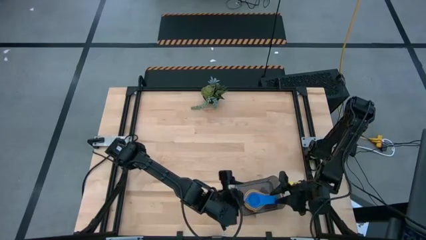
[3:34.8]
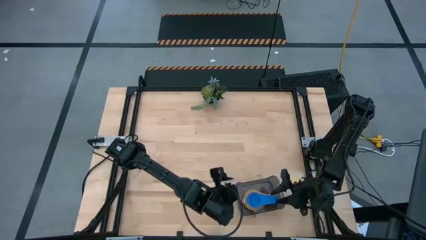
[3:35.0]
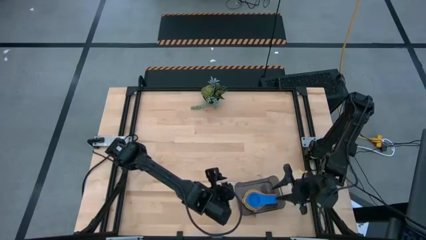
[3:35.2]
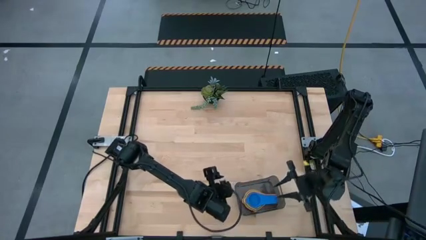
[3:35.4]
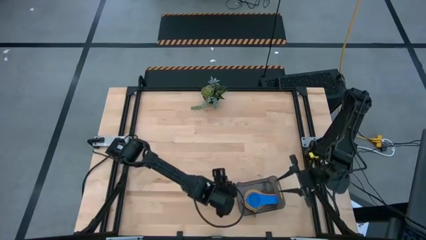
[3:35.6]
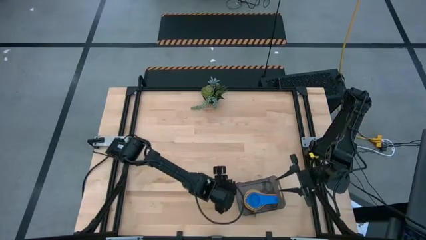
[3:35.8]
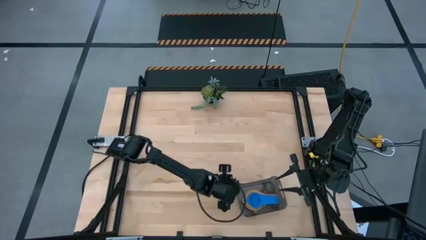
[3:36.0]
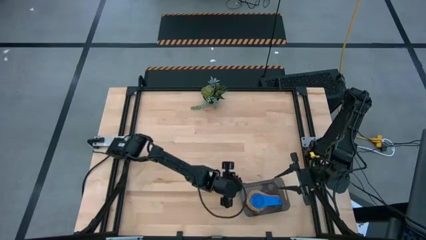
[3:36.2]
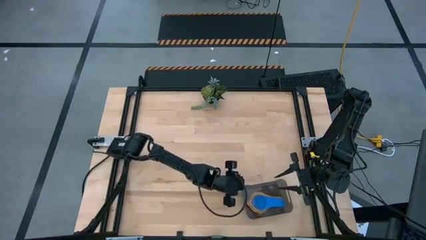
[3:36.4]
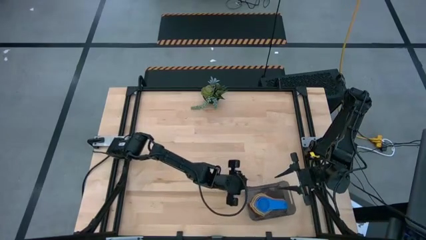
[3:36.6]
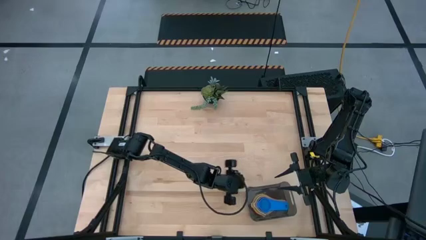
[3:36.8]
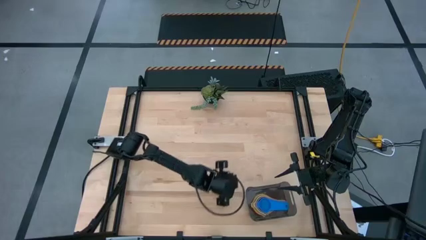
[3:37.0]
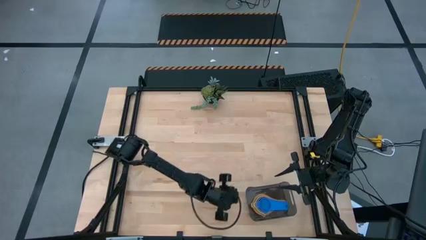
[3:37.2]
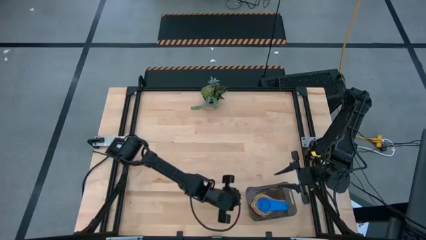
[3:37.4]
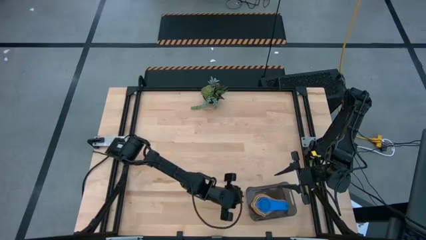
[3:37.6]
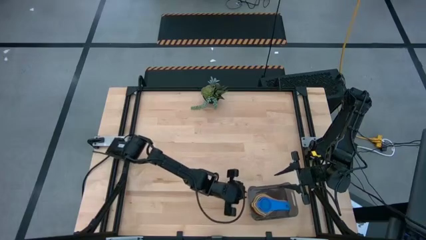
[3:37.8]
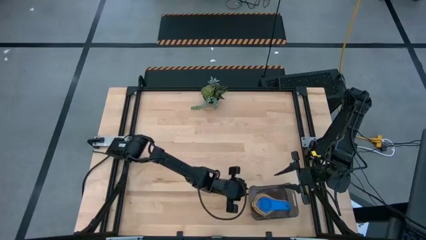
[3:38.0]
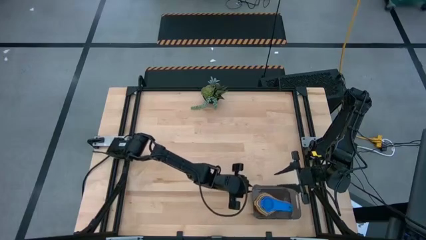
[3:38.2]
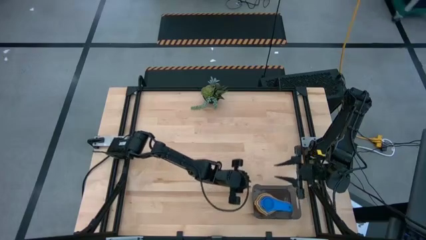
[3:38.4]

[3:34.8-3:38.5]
Task: Nest measuring cups in basket
Adjust the black transparent bin on the table

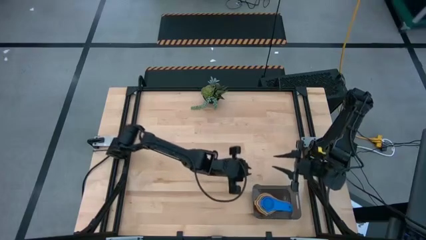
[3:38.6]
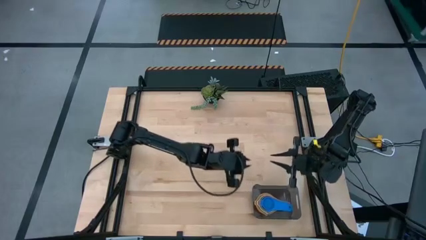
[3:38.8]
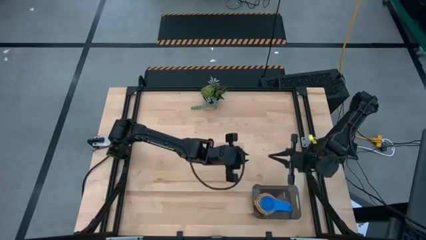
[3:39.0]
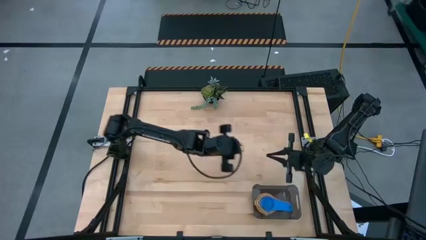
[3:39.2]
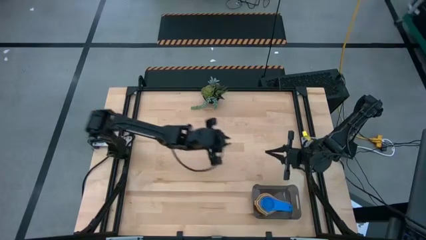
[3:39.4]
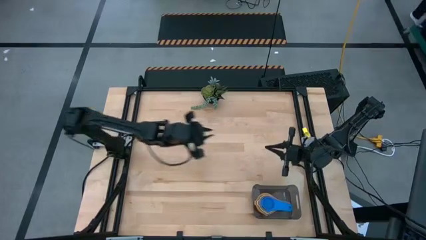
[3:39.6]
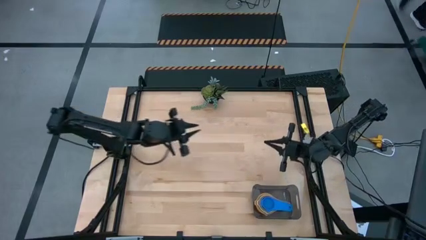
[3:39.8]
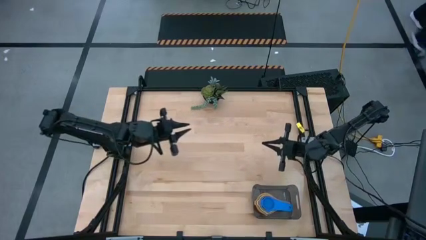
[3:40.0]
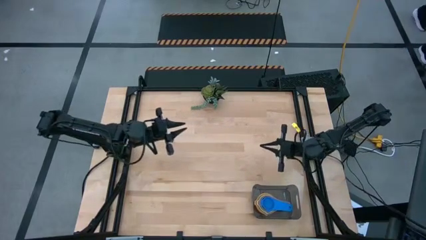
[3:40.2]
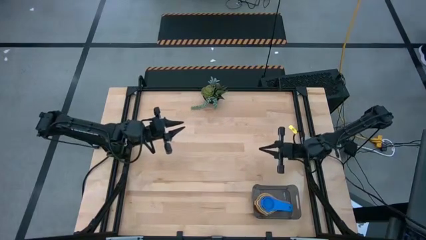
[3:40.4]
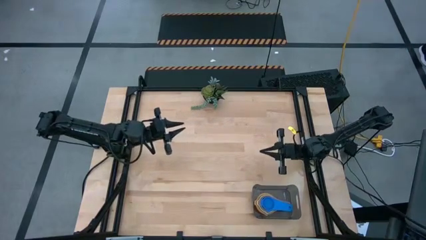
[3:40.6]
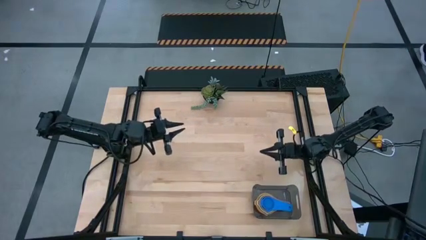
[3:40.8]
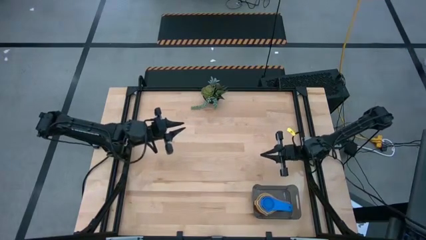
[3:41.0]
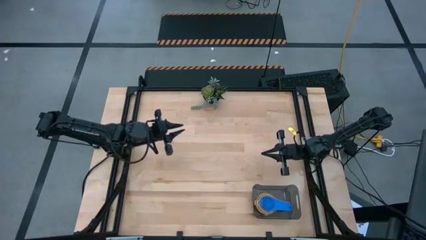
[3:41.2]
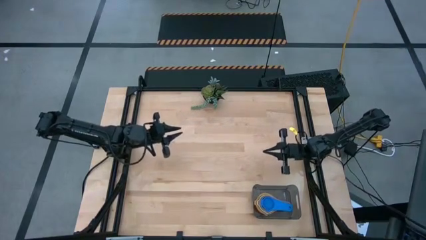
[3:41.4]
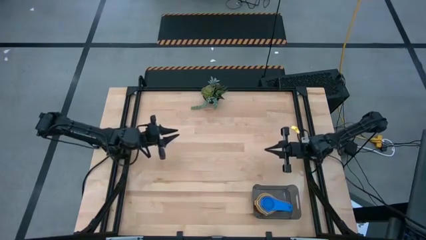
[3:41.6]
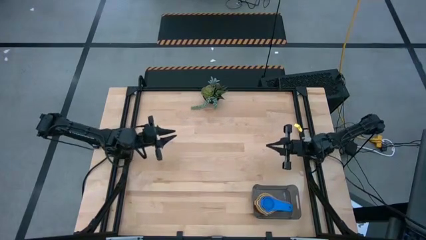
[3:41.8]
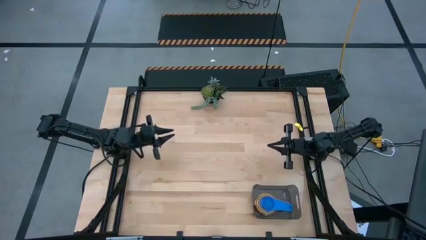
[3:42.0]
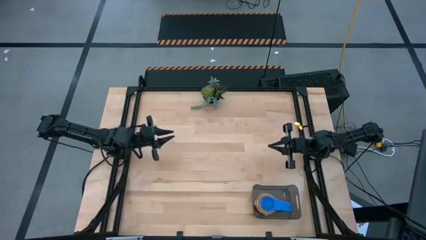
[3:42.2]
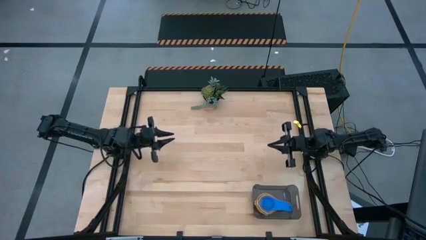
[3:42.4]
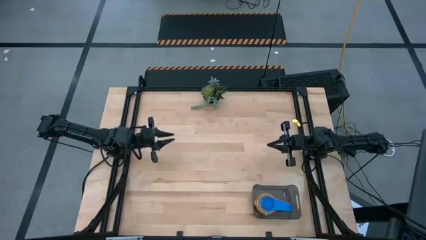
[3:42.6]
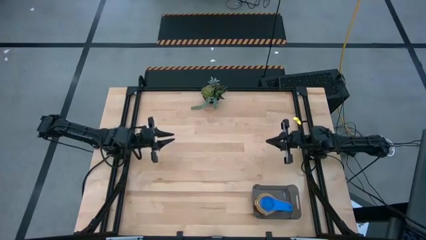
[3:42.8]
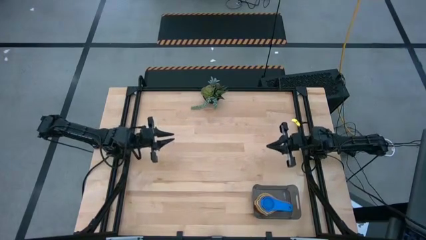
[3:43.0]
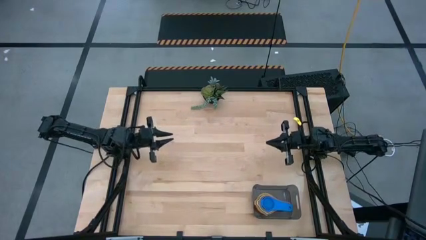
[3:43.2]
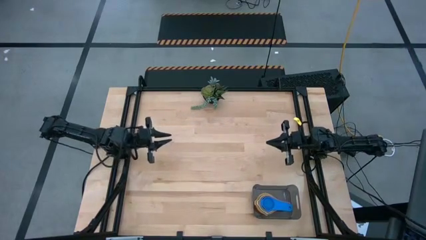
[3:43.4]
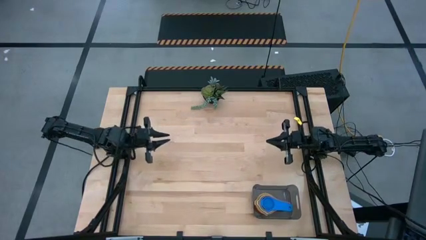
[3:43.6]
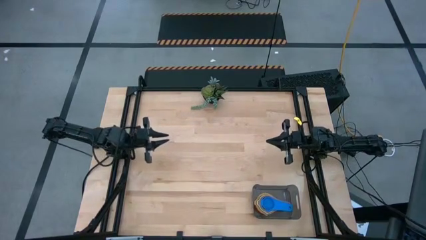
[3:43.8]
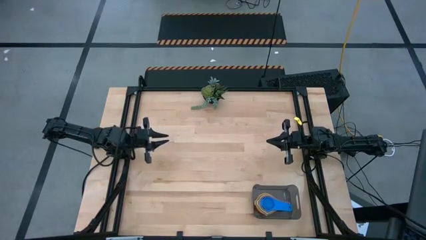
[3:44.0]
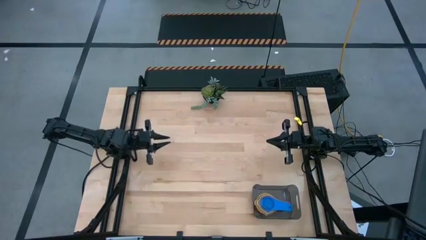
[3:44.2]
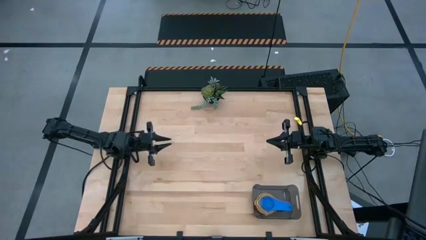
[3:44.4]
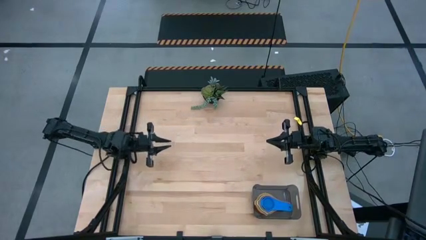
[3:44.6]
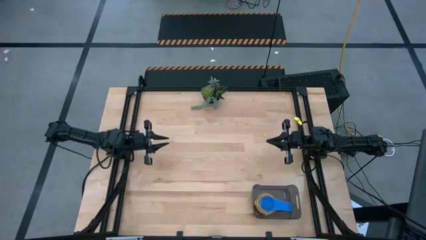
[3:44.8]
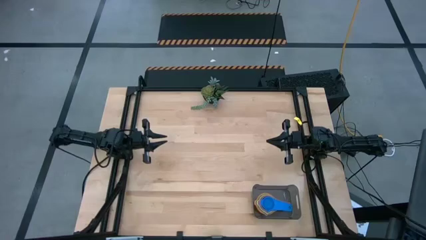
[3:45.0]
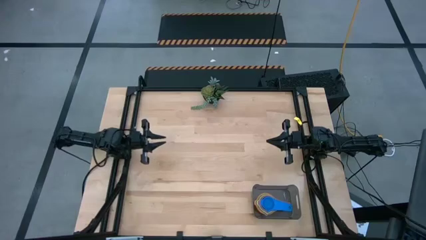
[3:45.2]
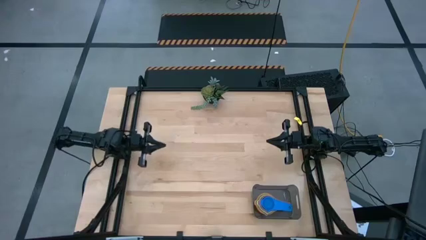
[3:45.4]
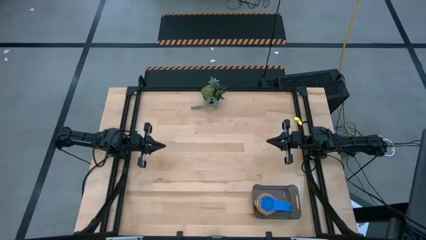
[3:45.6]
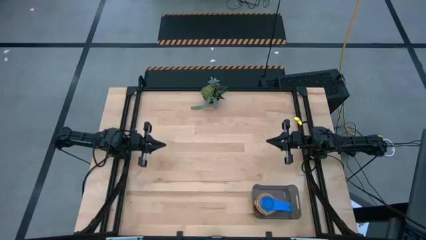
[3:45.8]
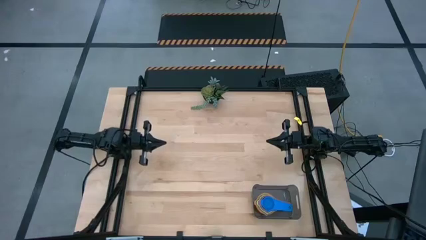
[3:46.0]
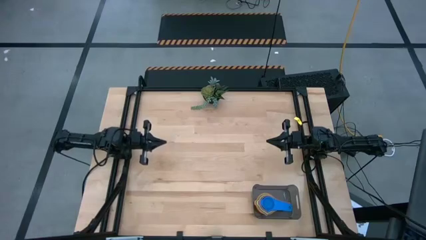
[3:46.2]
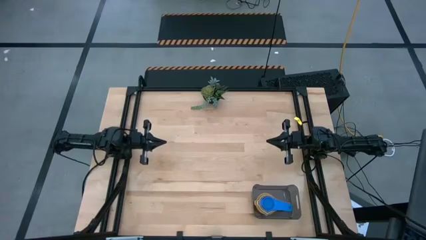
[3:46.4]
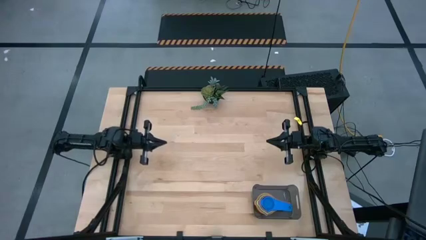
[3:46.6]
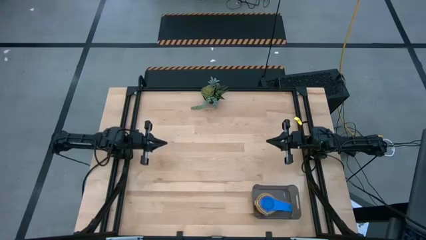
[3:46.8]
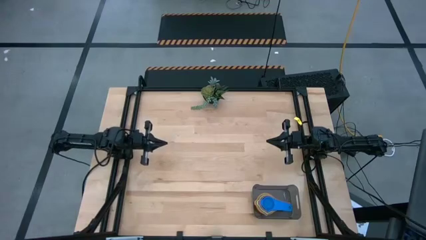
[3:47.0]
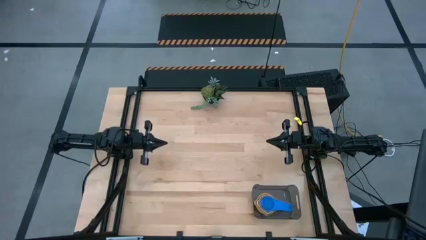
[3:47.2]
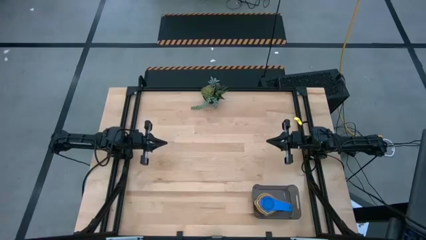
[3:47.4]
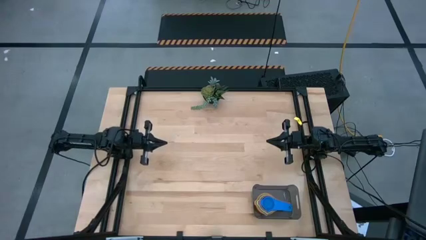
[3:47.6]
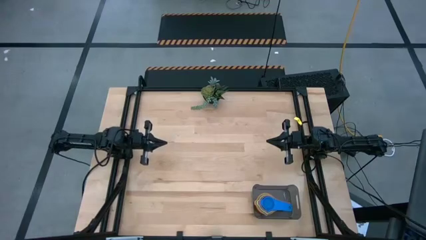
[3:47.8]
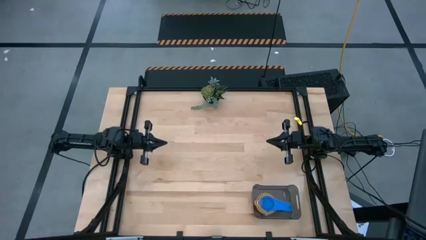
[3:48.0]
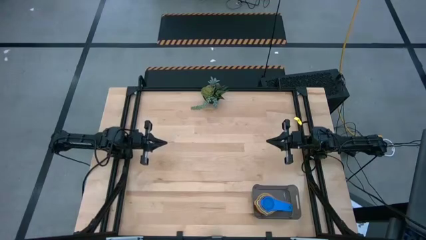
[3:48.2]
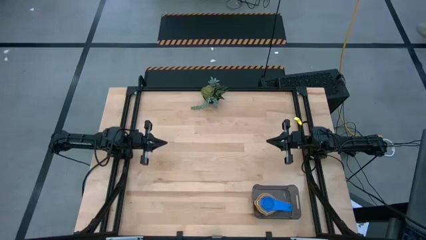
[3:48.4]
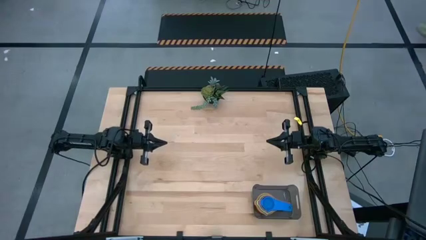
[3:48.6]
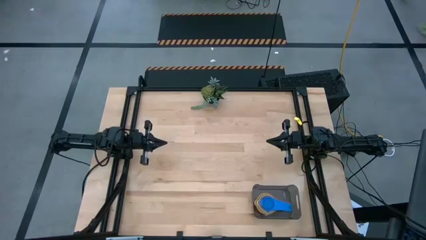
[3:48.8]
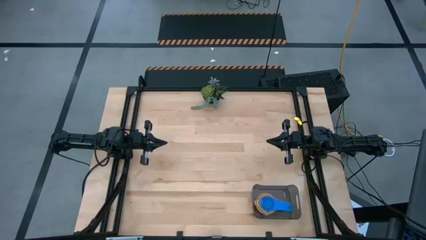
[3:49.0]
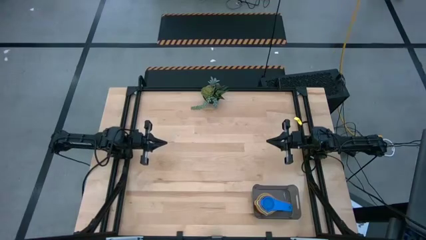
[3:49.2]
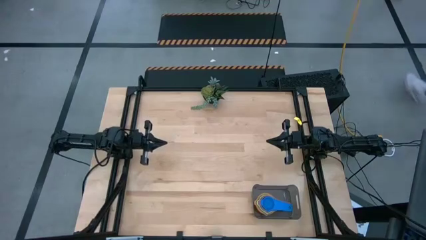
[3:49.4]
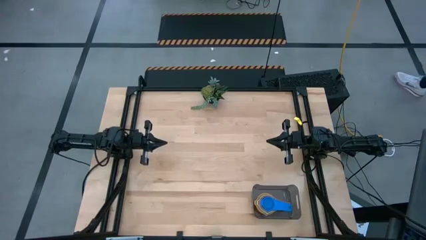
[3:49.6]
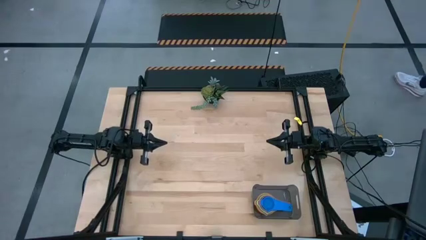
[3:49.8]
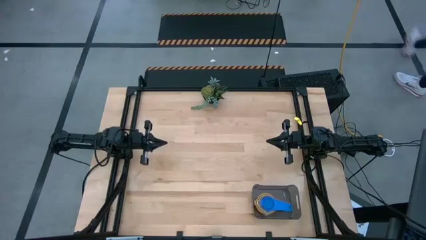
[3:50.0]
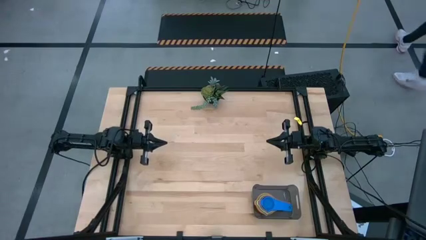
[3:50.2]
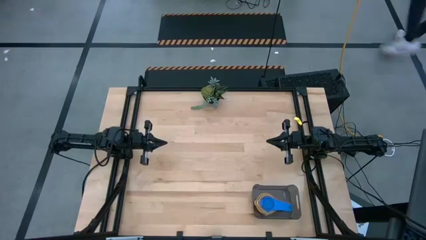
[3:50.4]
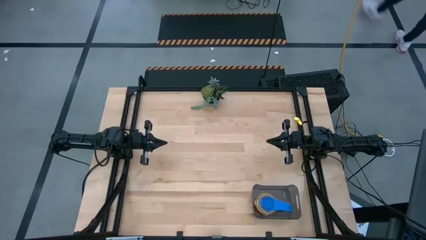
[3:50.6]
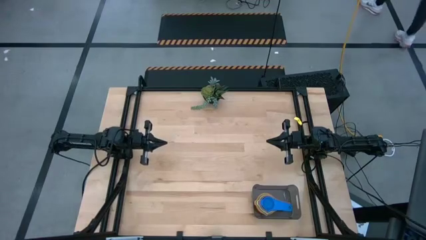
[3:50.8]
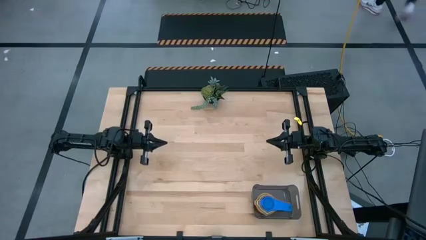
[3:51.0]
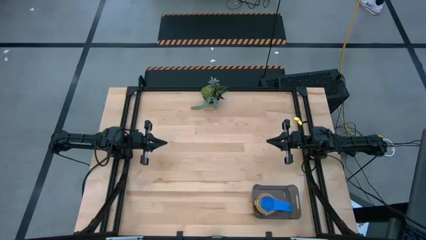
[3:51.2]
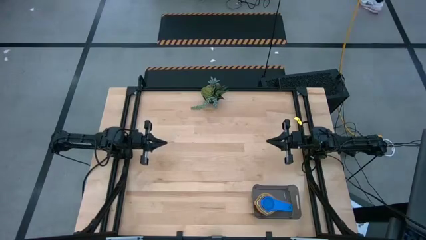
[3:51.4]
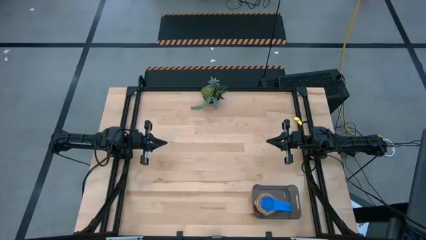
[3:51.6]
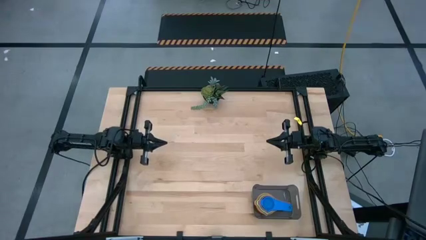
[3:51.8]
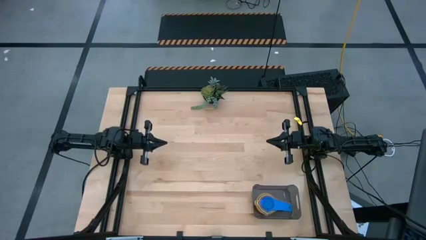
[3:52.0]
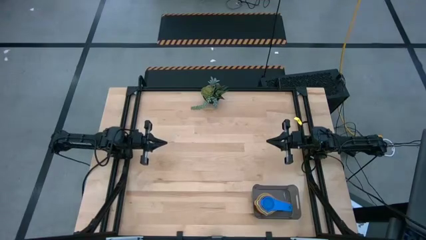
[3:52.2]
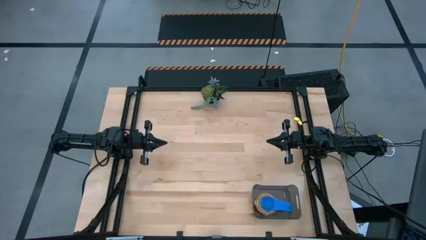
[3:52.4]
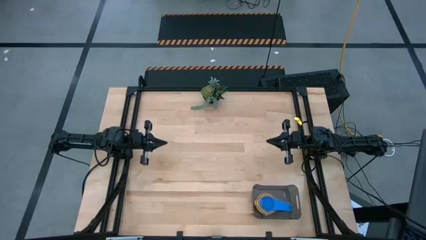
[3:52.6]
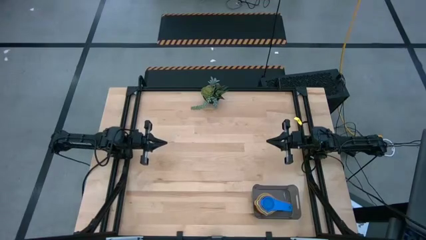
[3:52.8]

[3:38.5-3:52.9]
Return to Home Position
